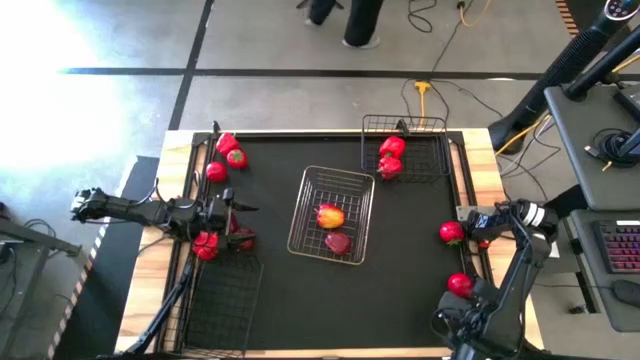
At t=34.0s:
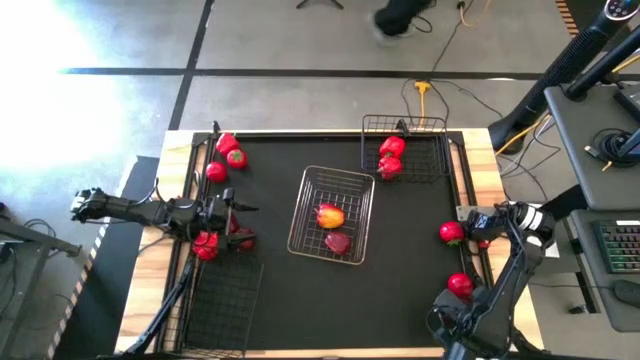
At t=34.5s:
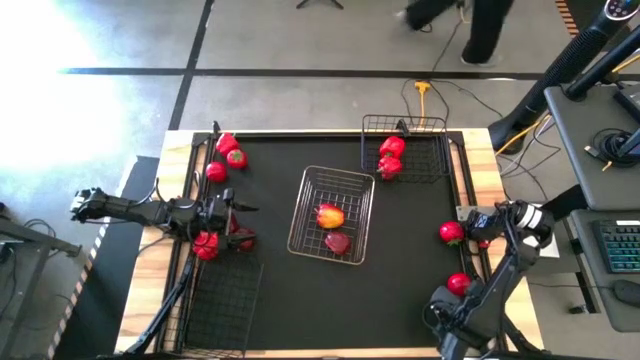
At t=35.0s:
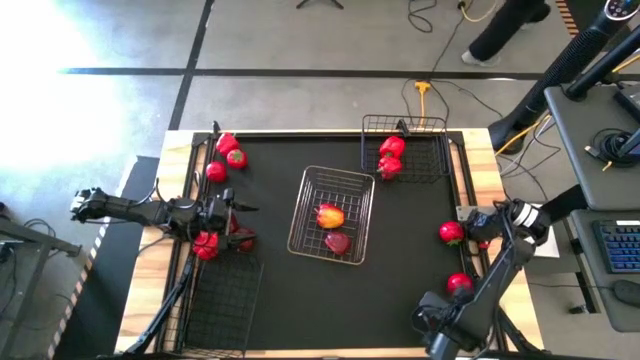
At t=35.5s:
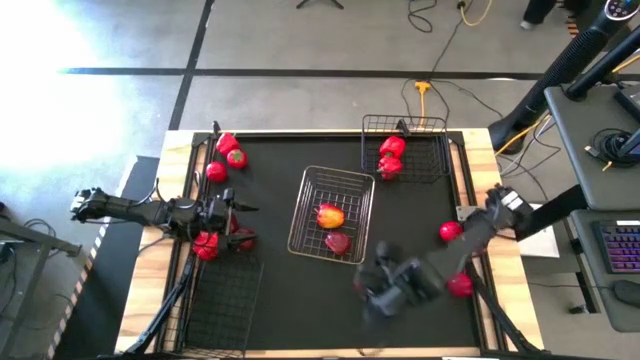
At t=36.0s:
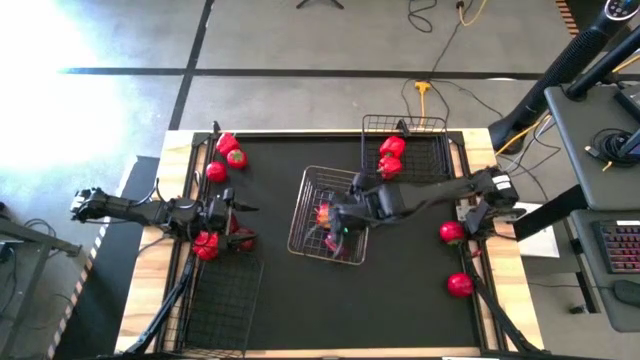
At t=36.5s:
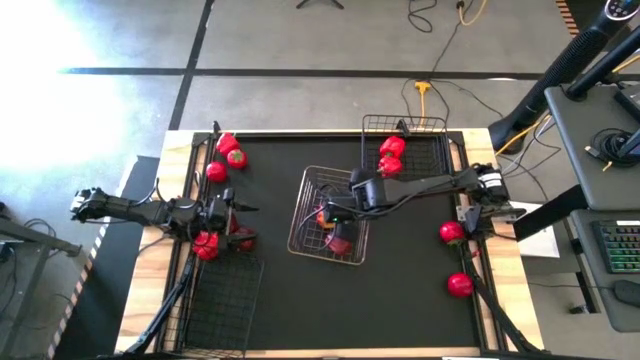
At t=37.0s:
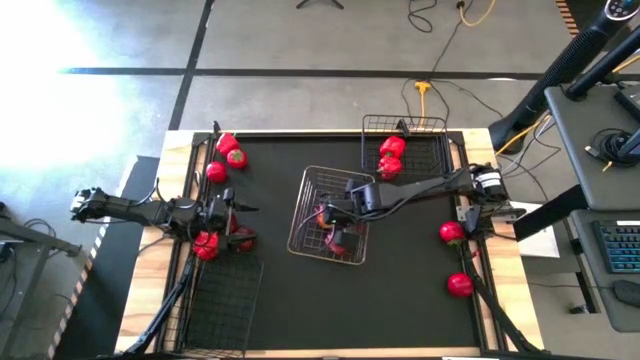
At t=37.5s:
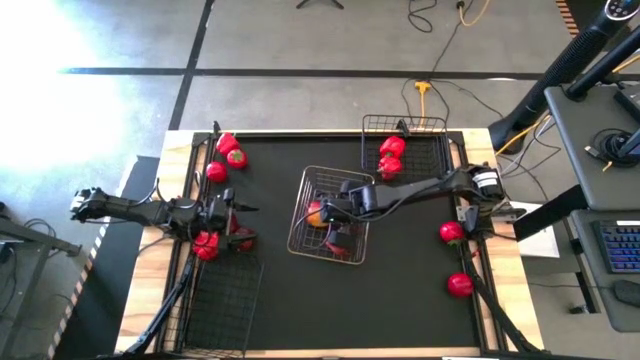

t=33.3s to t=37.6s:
Task: Sort produce into baskets
Put the red apple into the gold wire basket

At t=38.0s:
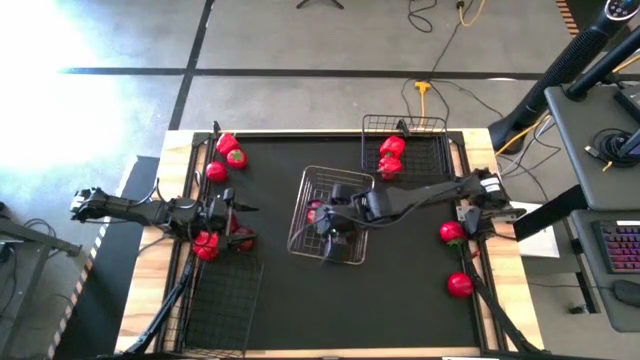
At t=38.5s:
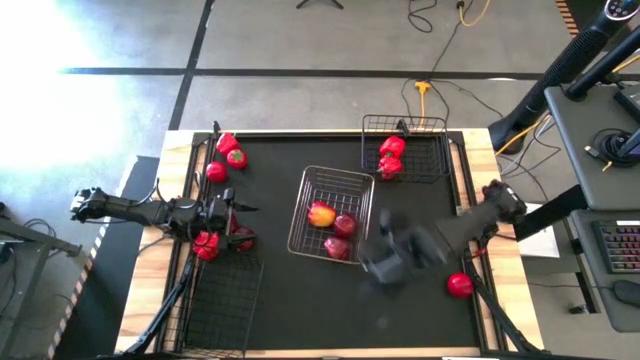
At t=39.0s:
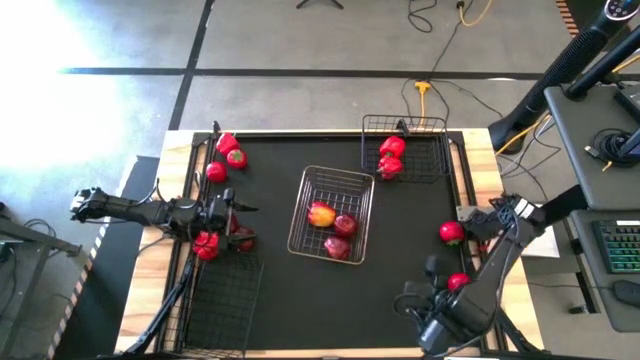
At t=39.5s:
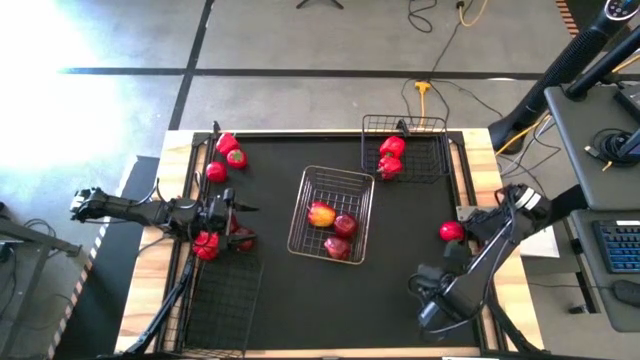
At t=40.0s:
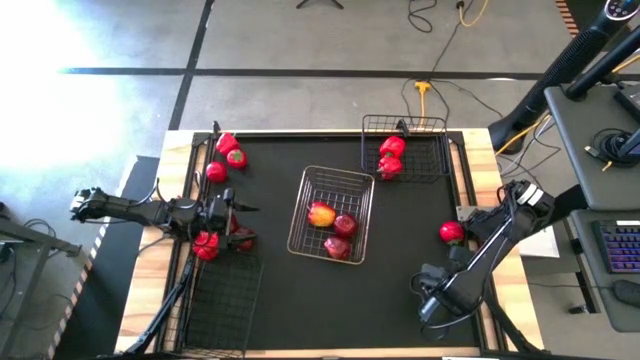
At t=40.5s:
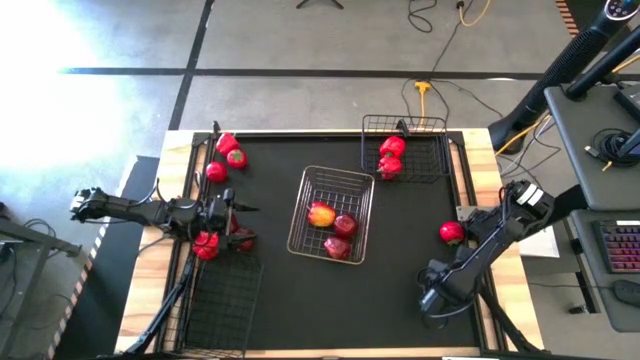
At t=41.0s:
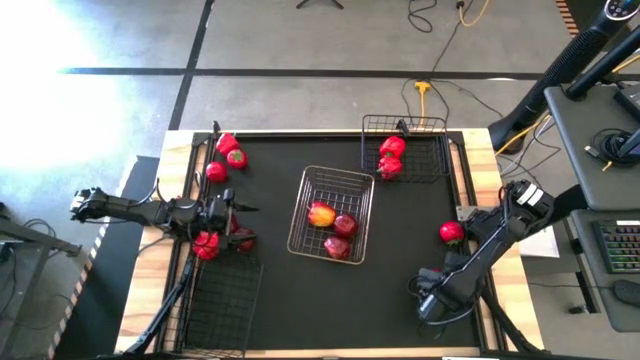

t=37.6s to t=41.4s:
Move the red tomato to the bottom of the gold wire basket on the table

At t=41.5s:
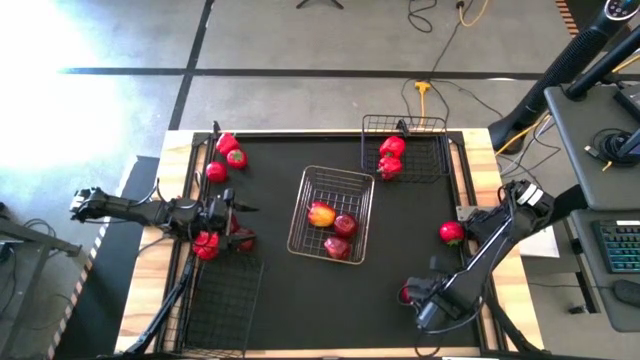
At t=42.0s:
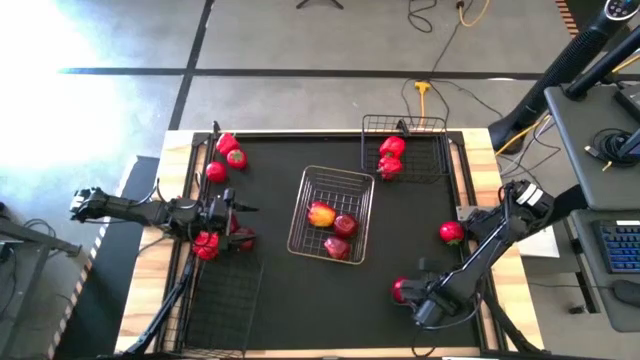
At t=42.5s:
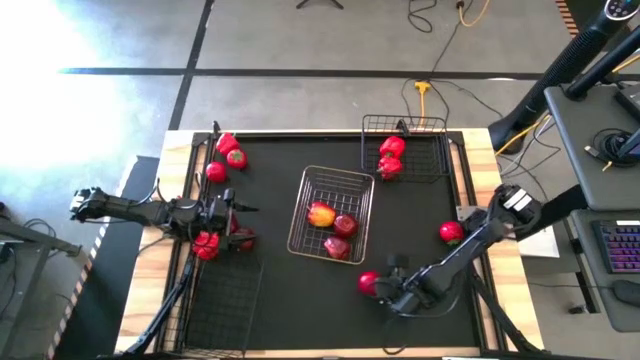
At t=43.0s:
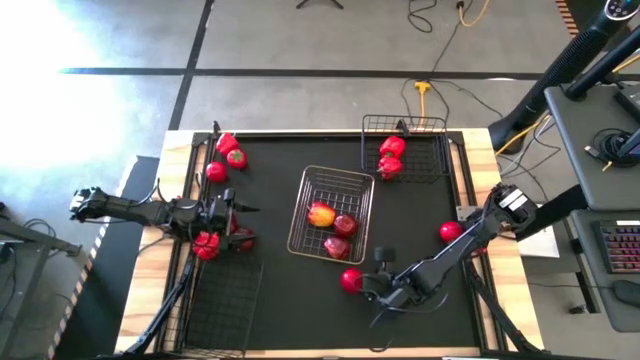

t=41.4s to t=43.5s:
Move the red tomato to the bottom of the gold wire basket on the table

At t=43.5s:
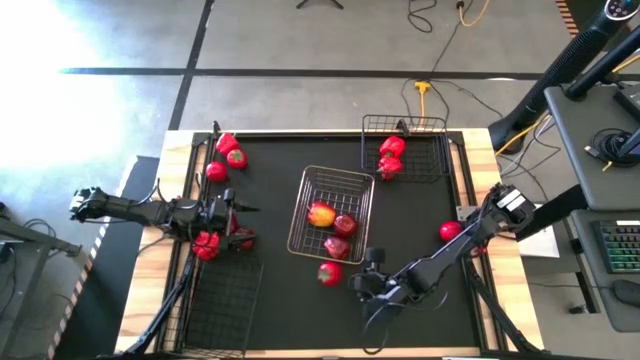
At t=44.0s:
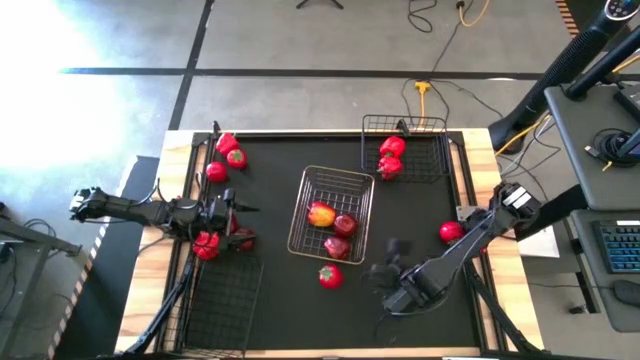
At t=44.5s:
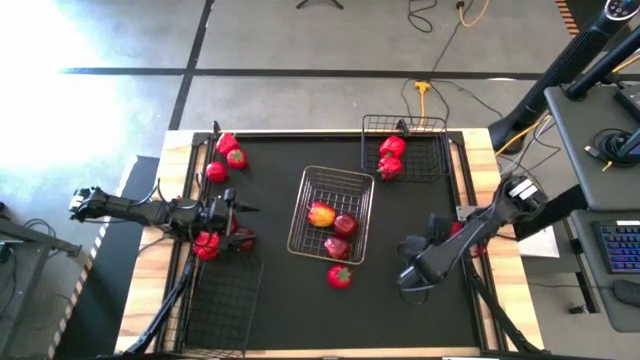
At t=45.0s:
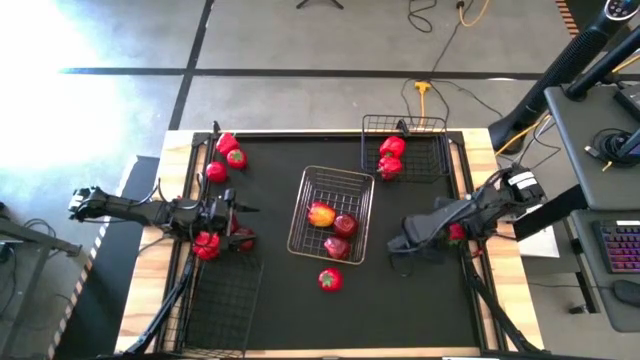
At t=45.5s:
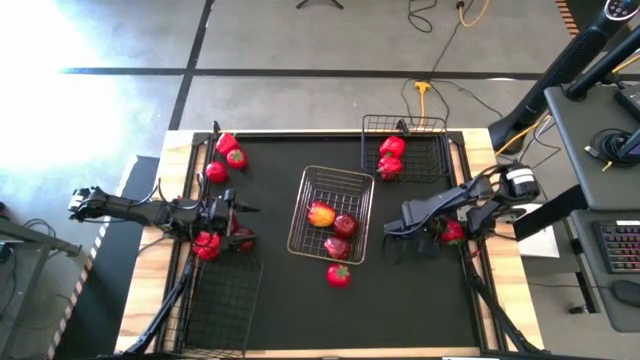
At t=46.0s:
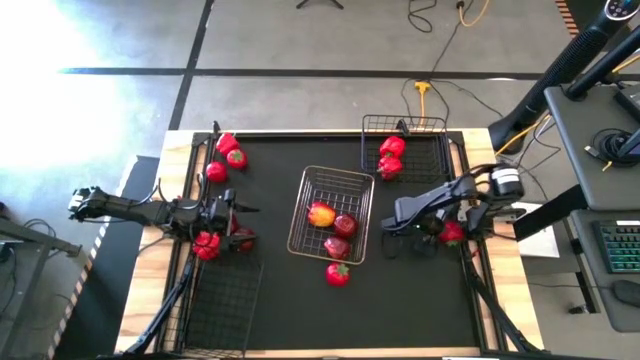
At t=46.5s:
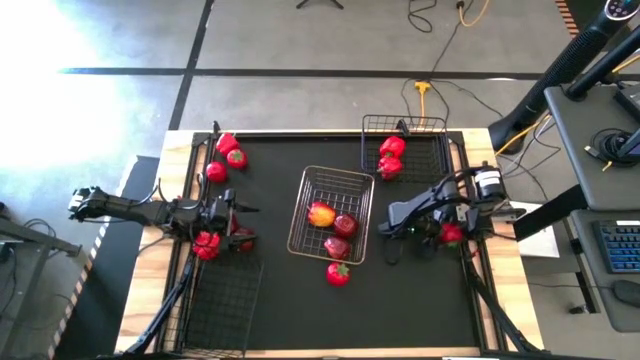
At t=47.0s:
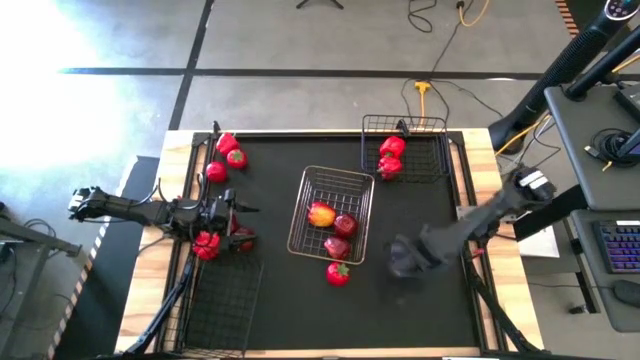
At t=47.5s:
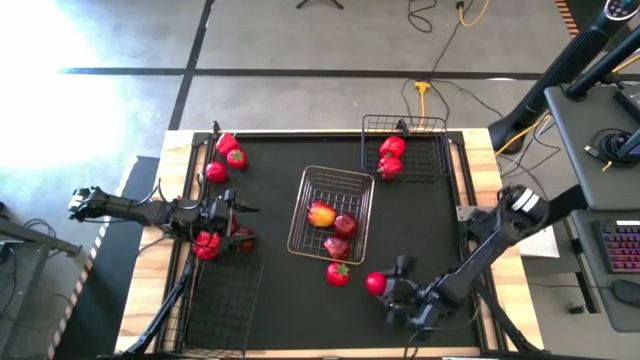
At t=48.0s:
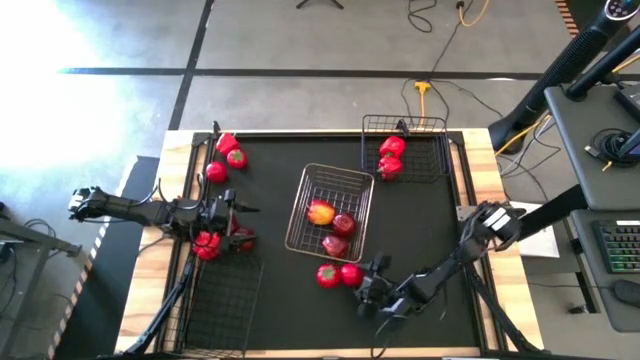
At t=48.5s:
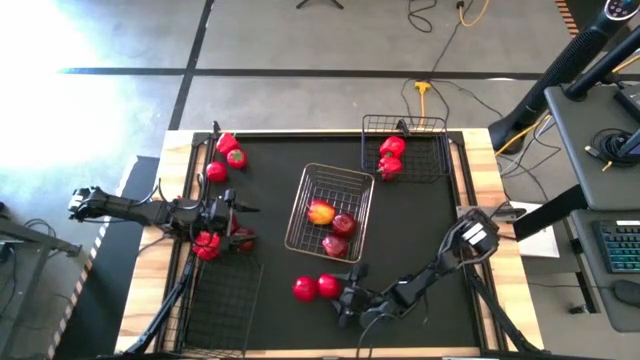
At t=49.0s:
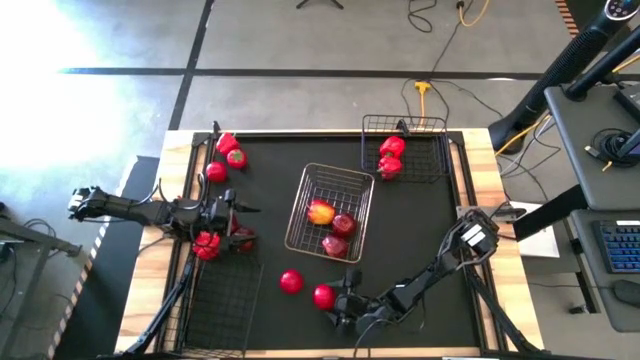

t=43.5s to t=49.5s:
Move the red tomato to the bottom of the gold wire basket on the table

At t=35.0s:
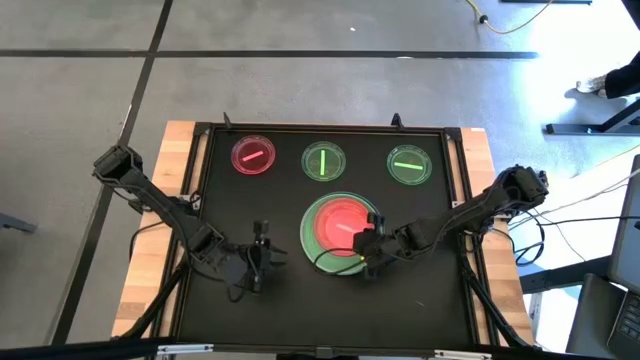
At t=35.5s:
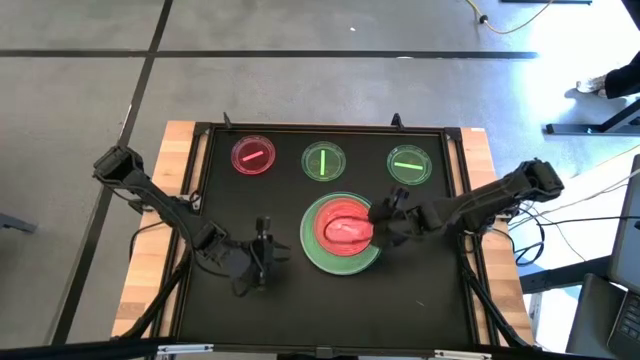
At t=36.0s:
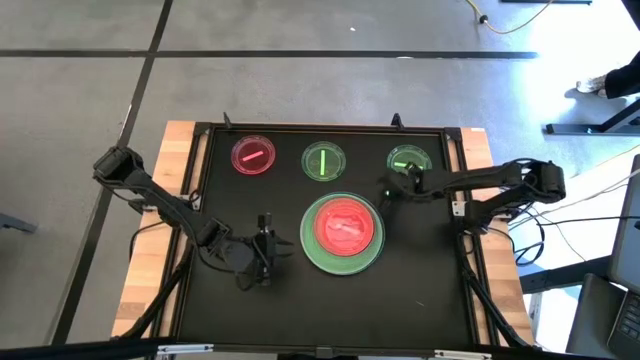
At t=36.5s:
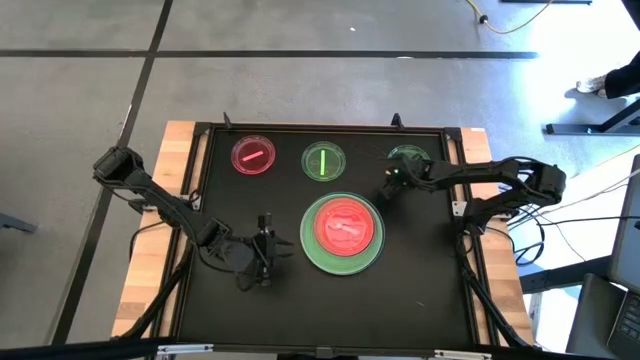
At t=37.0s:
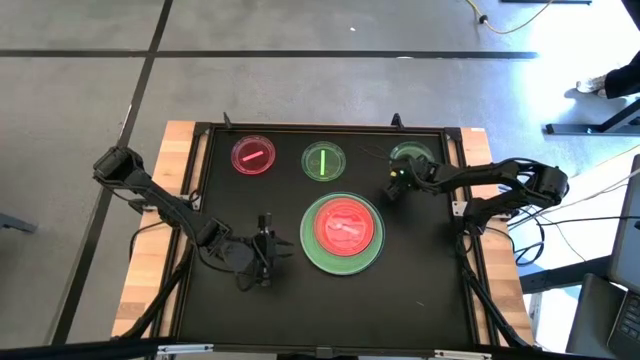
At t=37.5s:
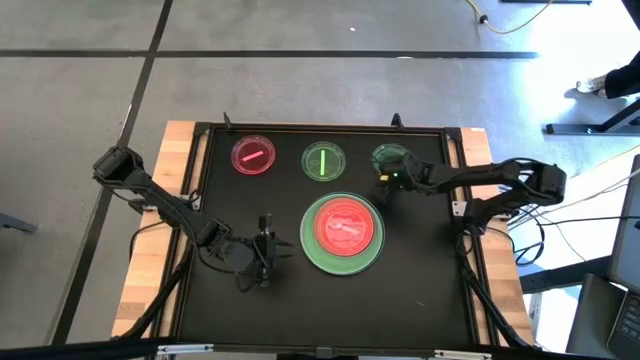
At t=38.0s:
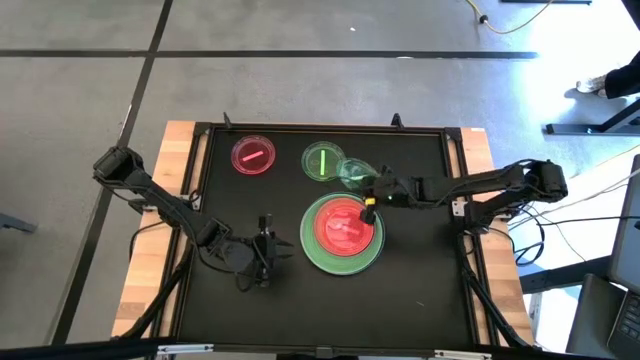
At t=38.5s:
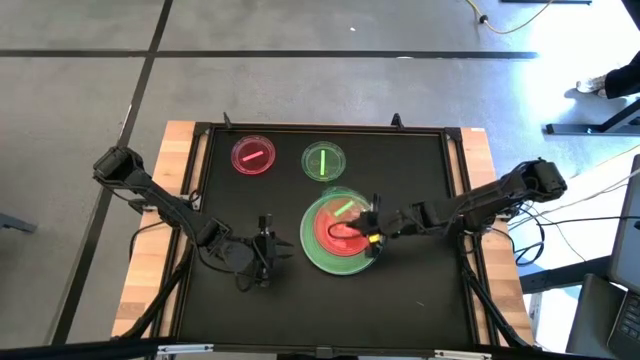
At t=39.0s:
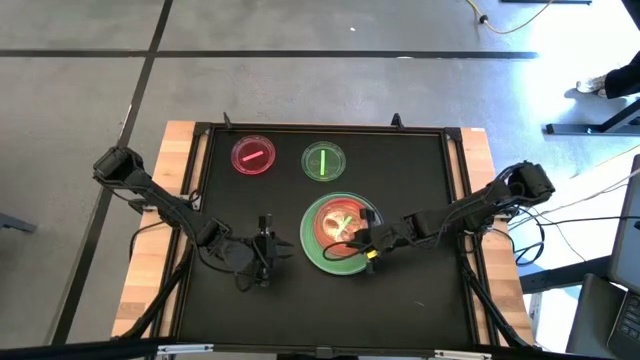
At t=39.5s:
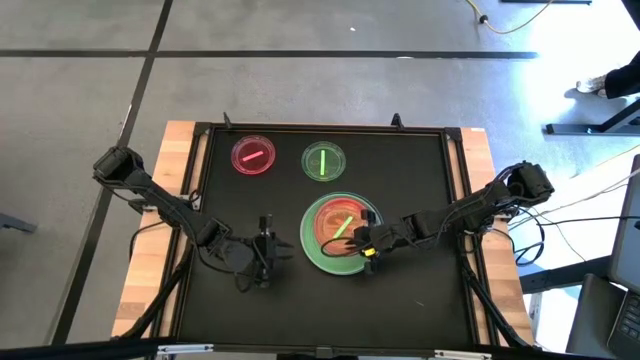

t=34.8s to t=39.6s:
Task: Stack plastic plates
Stack the transparent green plate on the transparent pink plate
